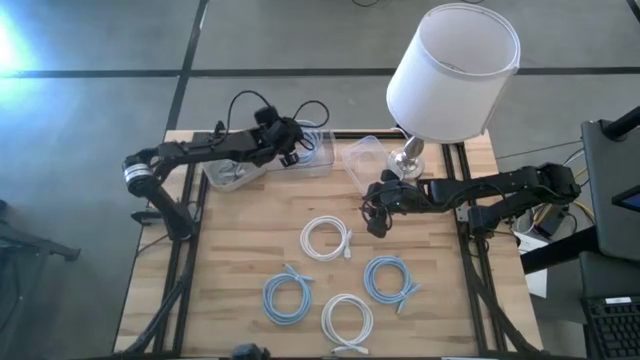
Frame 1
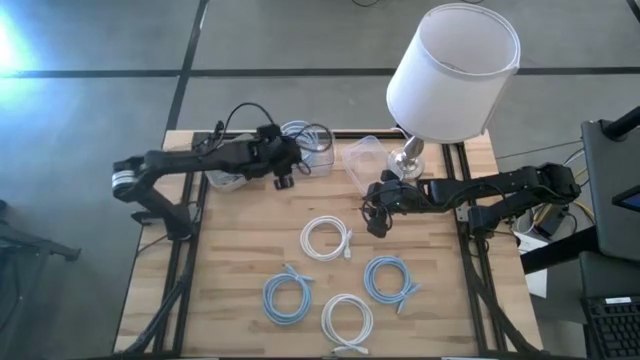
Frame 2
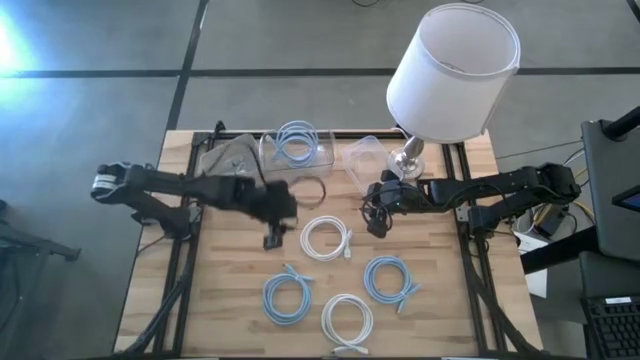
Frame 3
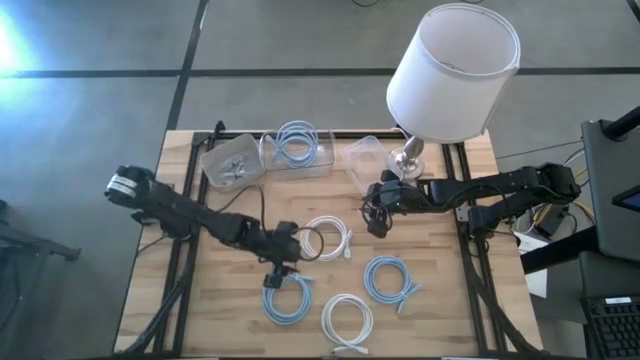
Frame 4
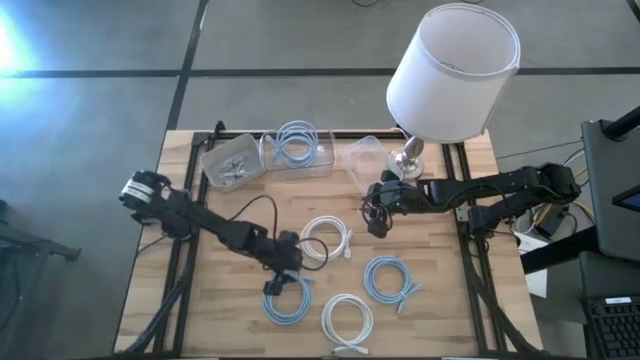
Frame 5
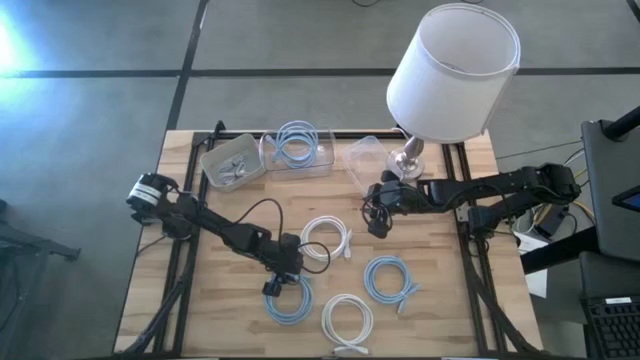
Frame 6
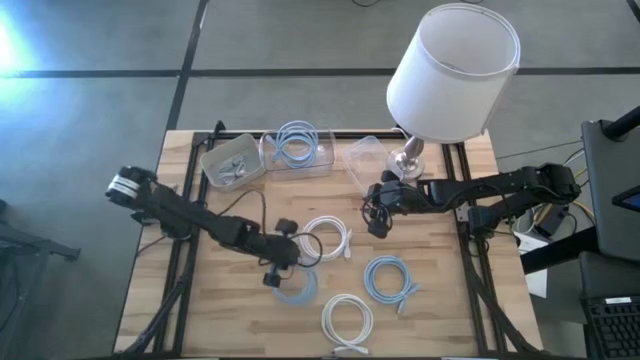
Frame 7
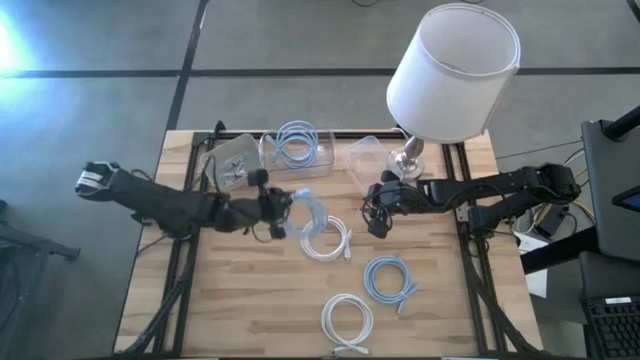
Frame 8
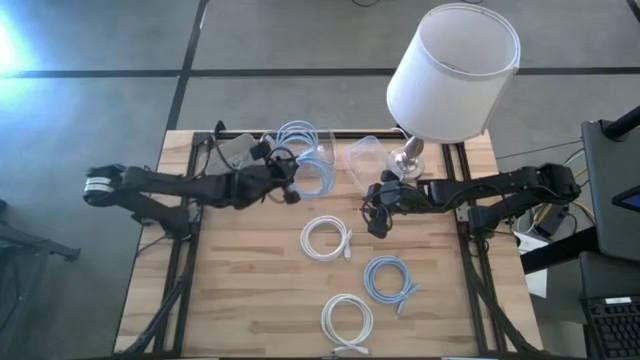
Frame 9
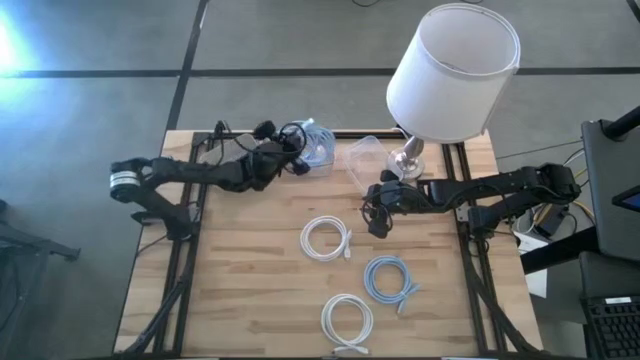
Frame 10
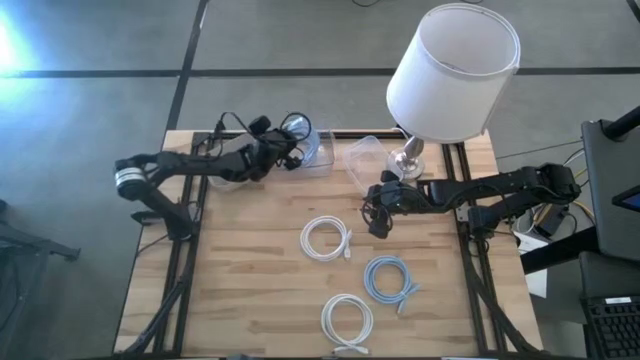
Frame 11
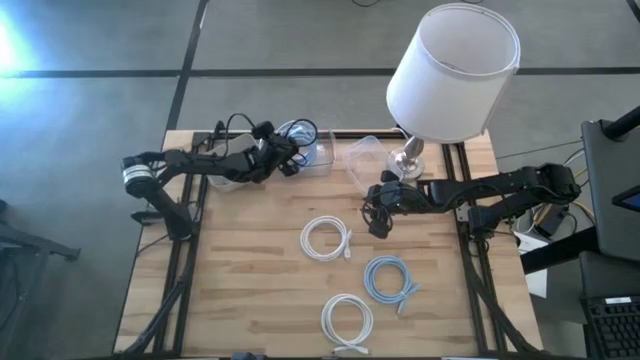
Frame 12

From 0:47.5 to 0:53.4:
Task: Pick & Place USB Port
Put the left light blue HDMI cable into the transparent bin

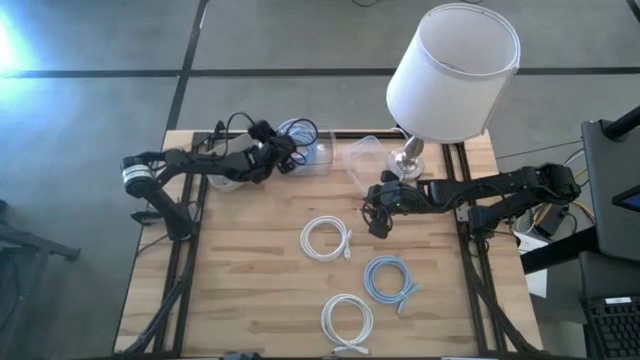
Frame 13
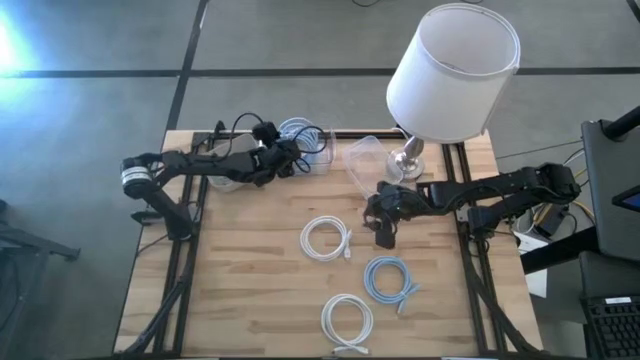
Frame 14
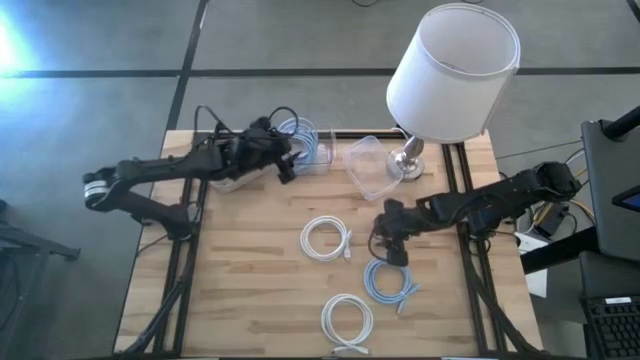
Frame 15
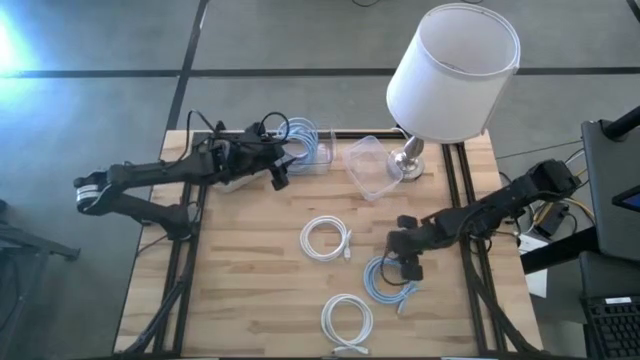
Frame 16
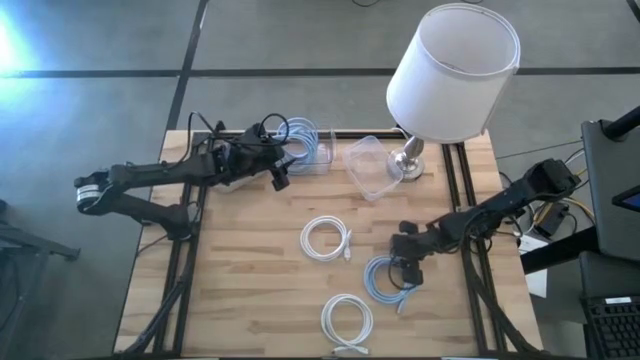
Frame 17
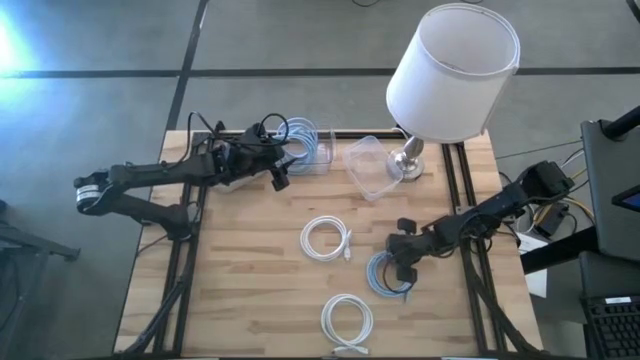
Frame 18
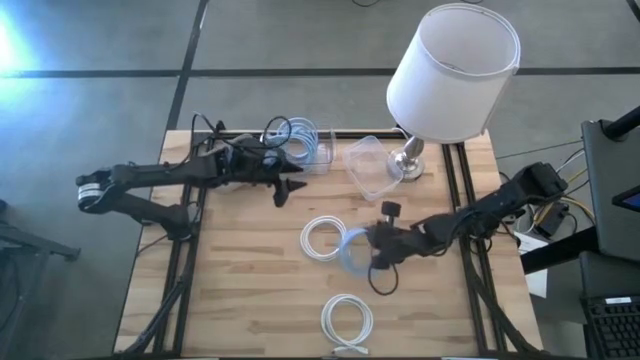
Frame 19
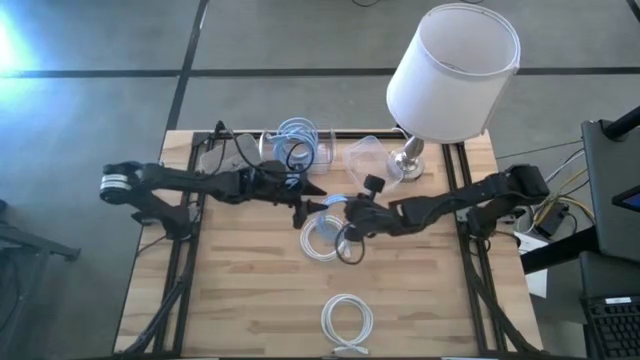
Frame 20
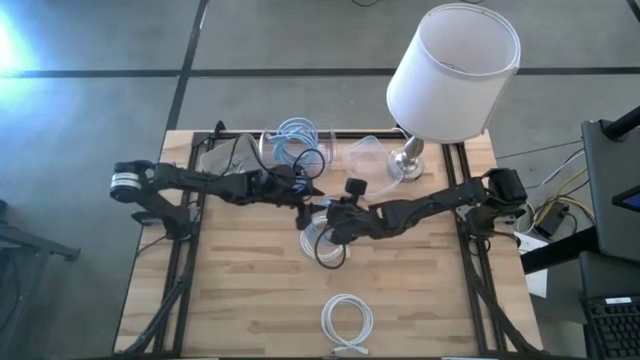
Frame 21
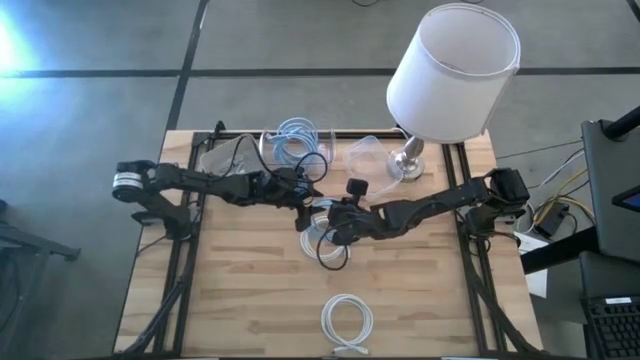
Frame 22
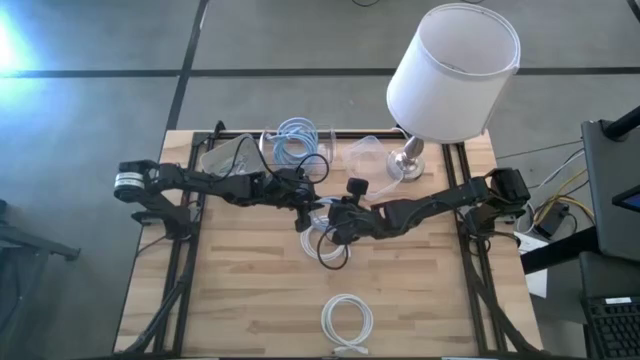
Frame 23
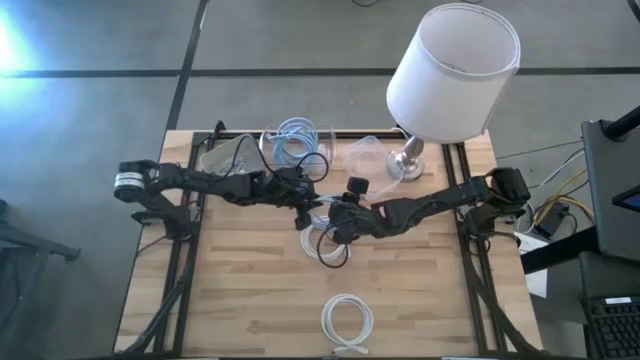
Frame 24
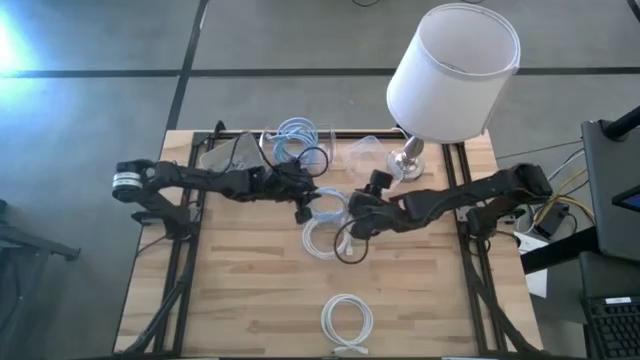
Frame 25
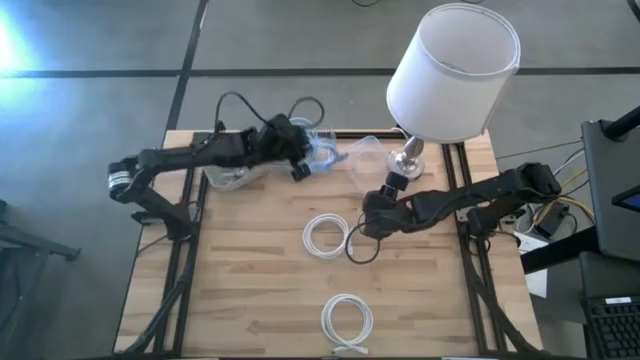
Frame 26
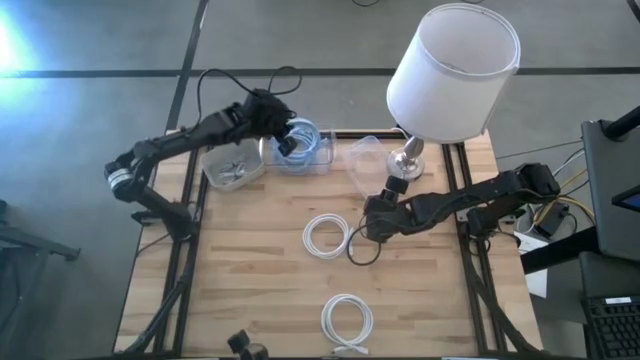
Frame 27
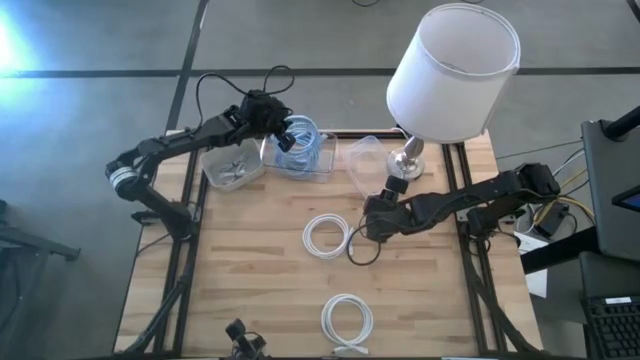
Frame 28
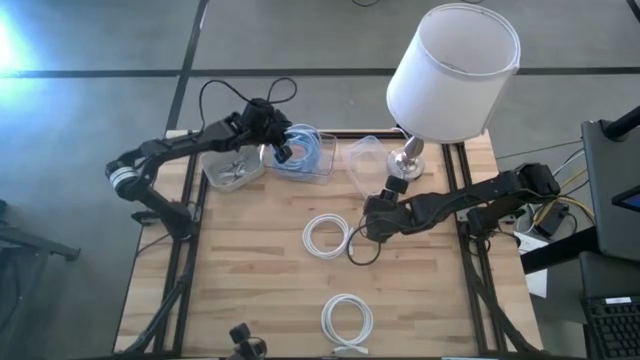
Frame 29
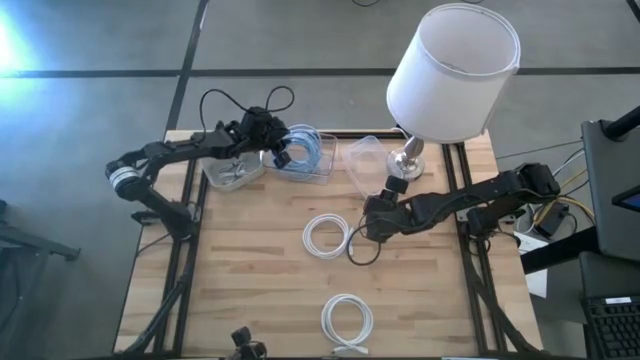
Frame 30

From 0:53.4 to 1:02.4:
Put the light blue HDMI cable into the transparent bin

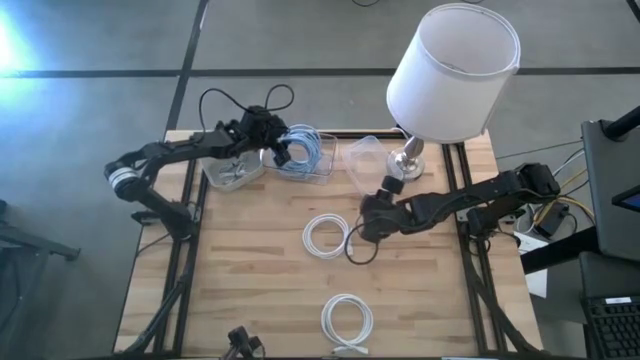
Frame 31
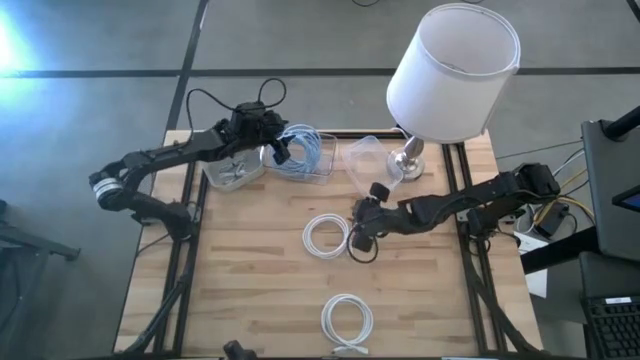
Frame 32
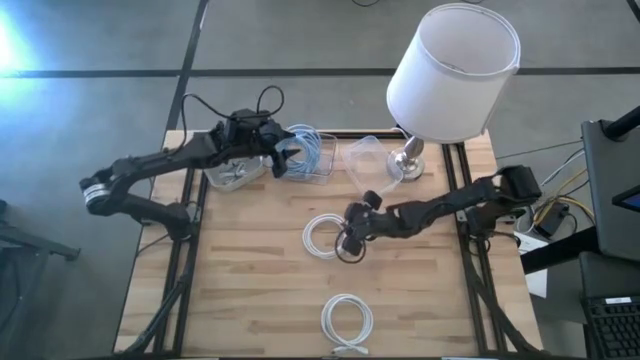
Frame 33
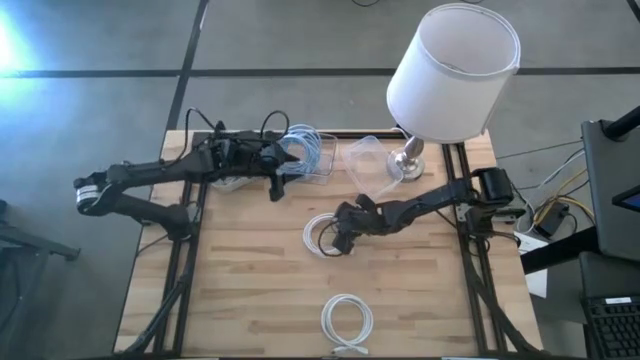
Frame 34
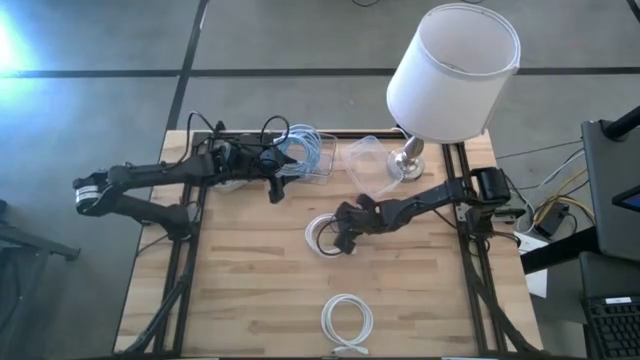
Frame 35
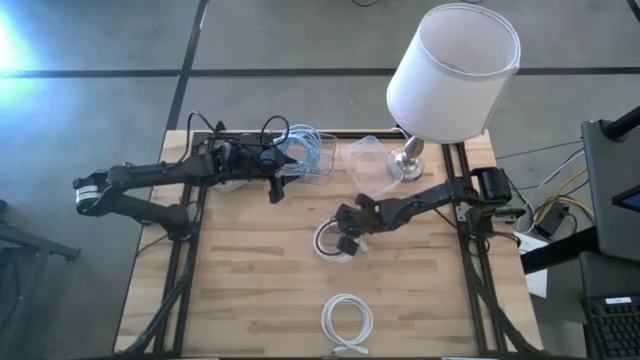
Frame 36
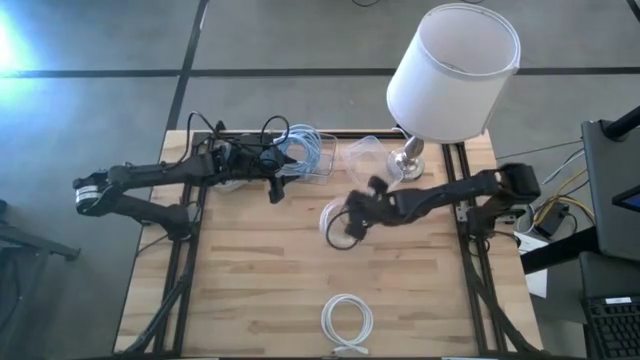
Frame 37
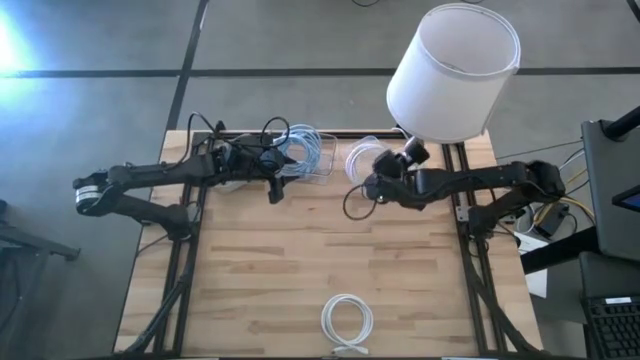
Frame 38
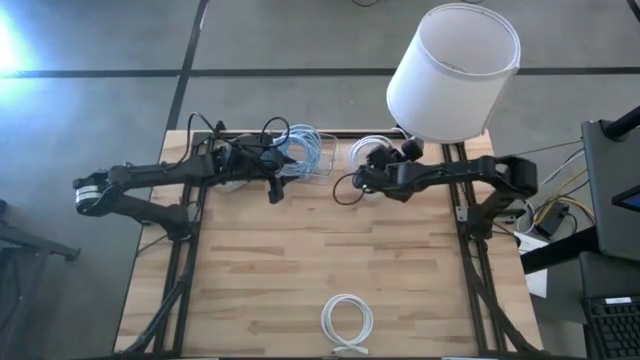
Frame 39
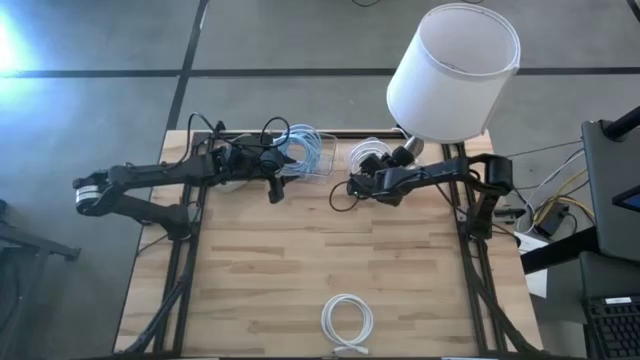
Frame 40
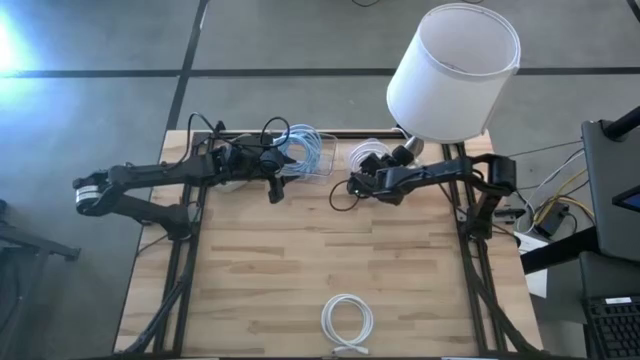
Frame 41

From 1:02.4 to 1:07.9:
Put the top white HDMI cable into the white bin
